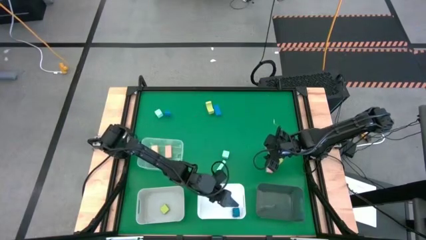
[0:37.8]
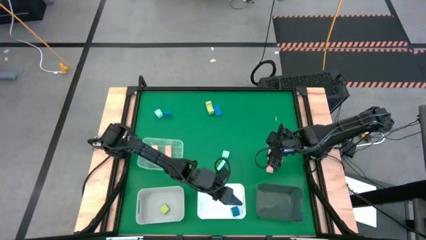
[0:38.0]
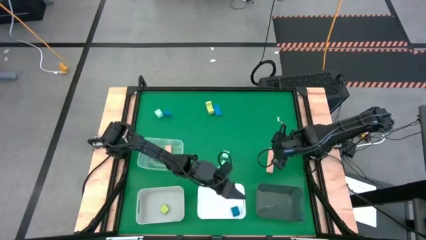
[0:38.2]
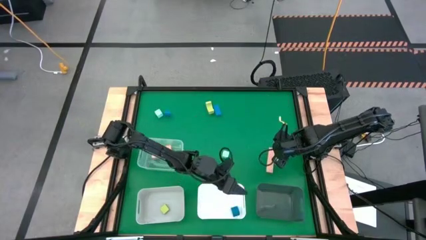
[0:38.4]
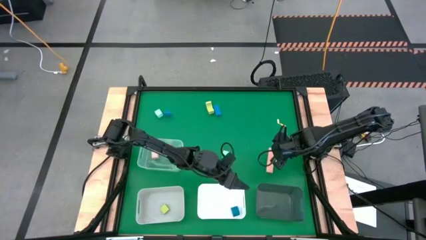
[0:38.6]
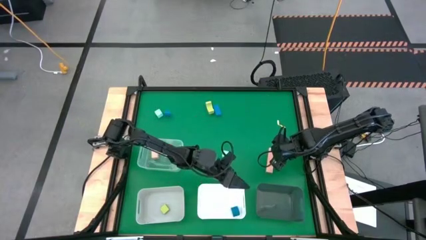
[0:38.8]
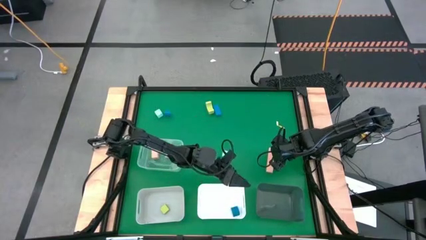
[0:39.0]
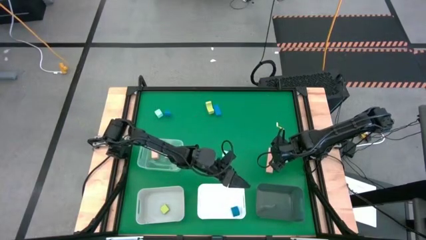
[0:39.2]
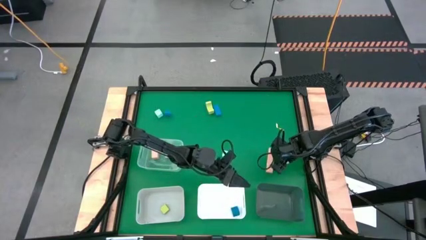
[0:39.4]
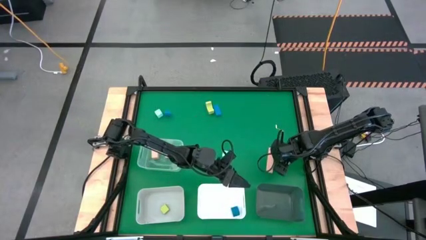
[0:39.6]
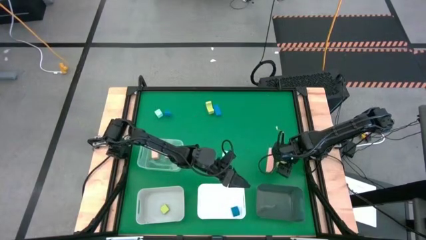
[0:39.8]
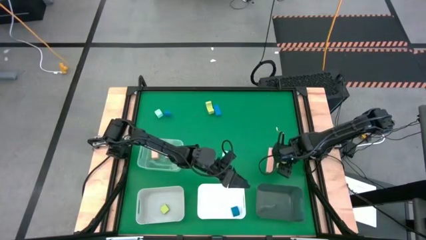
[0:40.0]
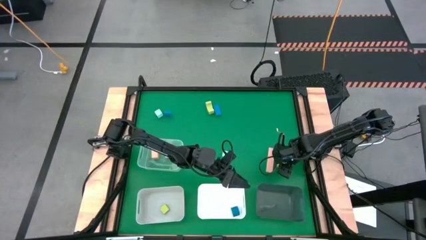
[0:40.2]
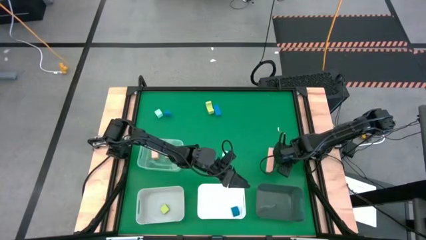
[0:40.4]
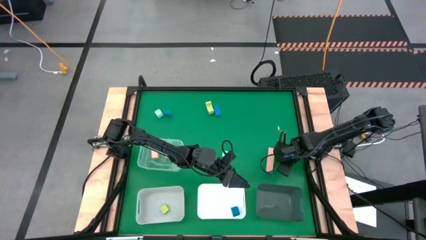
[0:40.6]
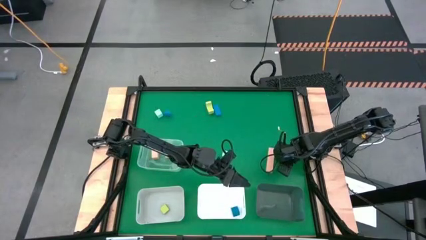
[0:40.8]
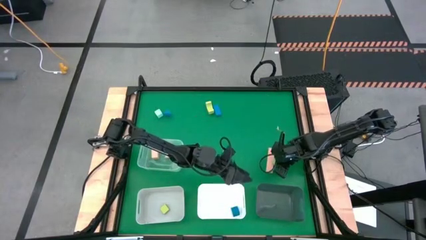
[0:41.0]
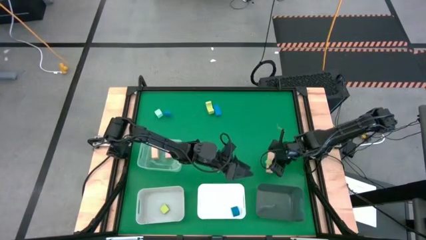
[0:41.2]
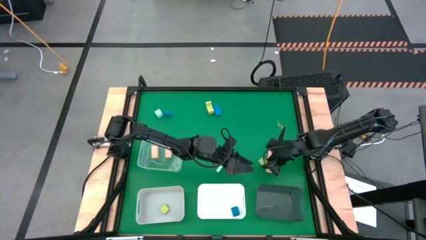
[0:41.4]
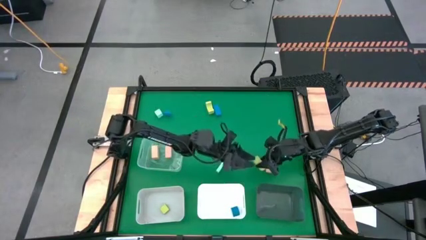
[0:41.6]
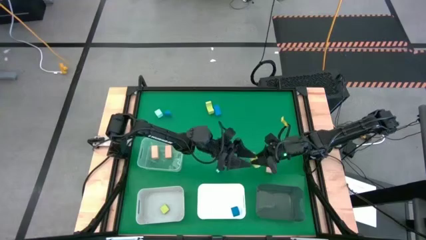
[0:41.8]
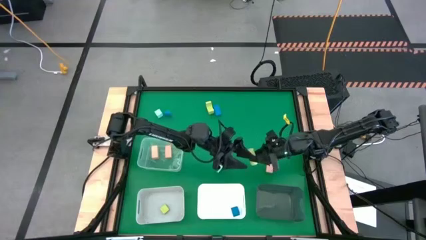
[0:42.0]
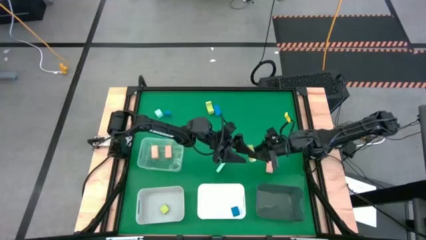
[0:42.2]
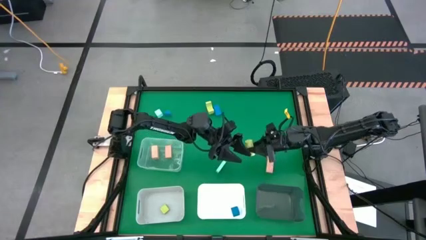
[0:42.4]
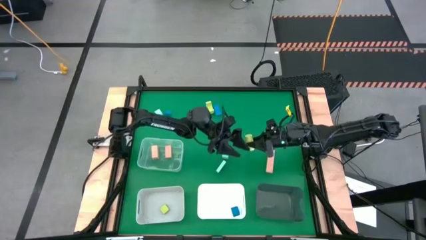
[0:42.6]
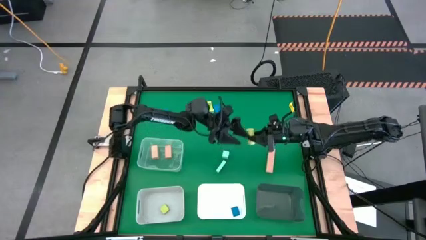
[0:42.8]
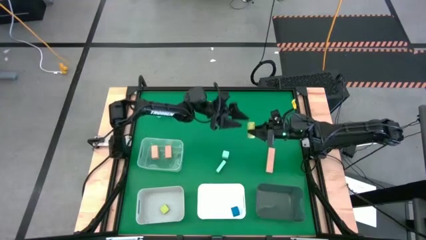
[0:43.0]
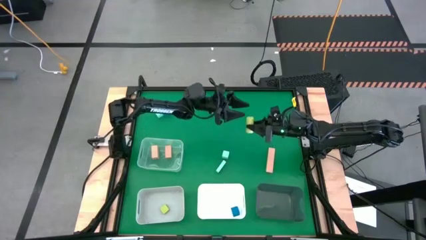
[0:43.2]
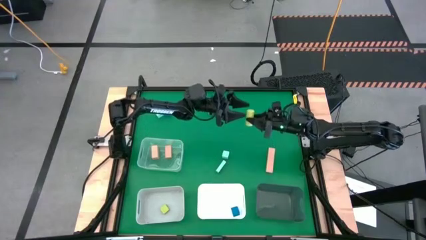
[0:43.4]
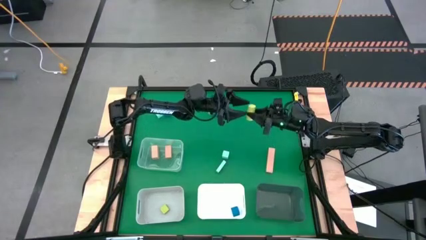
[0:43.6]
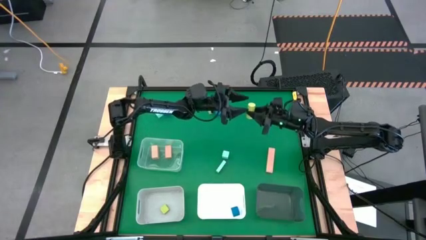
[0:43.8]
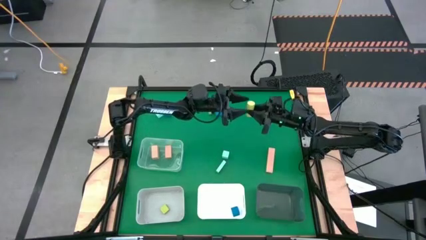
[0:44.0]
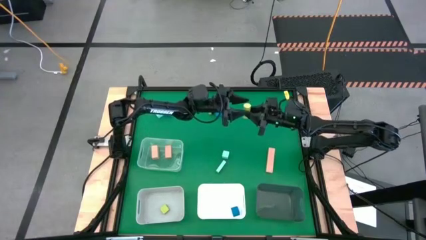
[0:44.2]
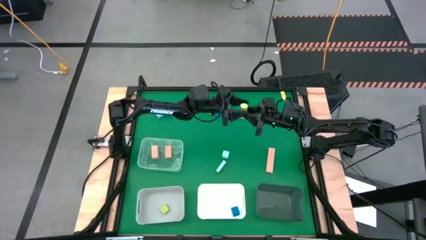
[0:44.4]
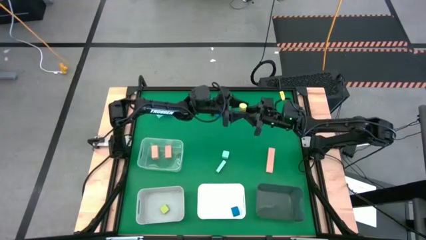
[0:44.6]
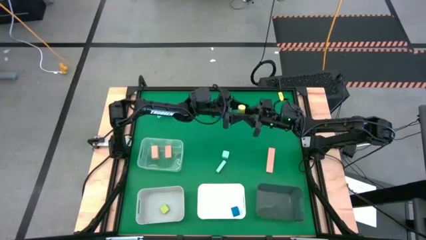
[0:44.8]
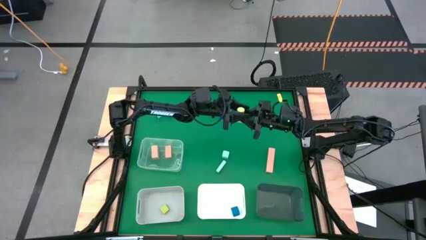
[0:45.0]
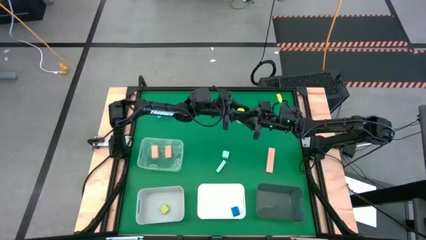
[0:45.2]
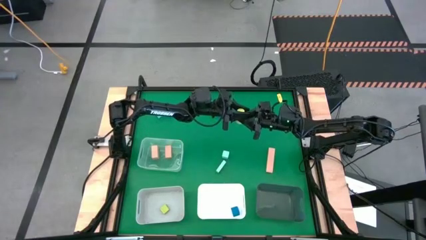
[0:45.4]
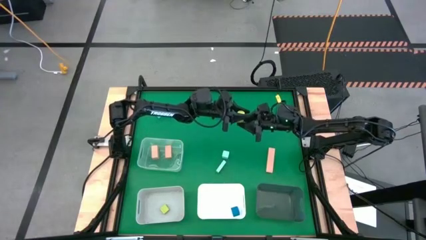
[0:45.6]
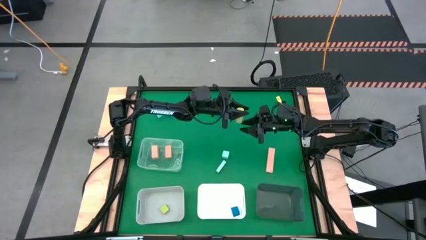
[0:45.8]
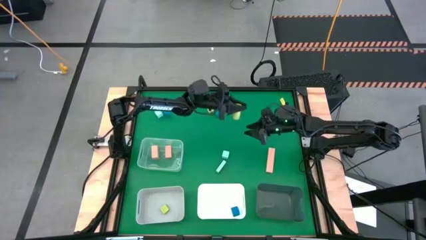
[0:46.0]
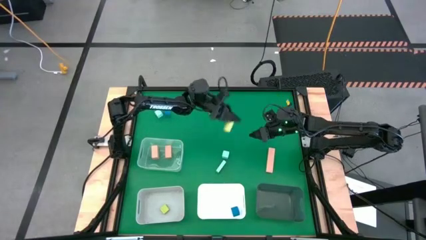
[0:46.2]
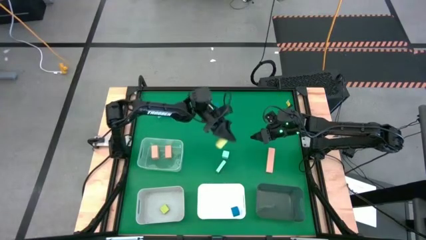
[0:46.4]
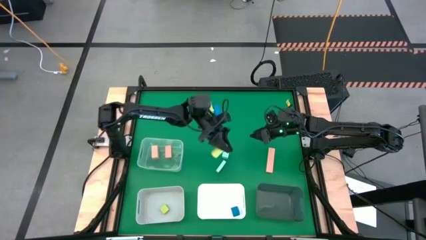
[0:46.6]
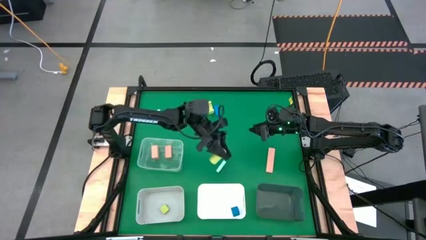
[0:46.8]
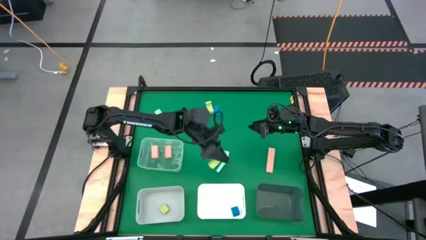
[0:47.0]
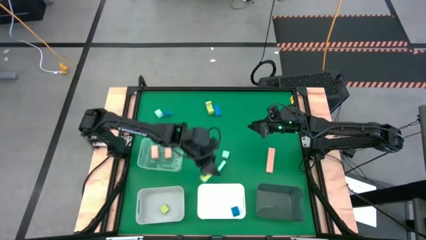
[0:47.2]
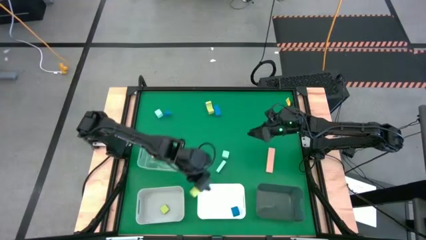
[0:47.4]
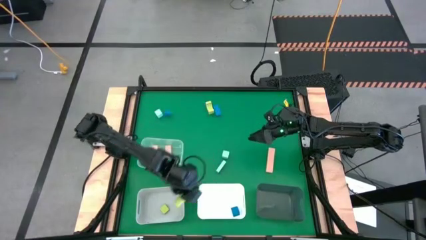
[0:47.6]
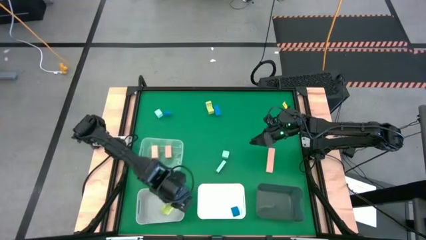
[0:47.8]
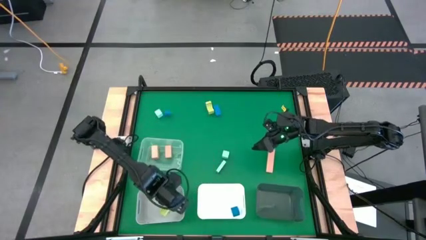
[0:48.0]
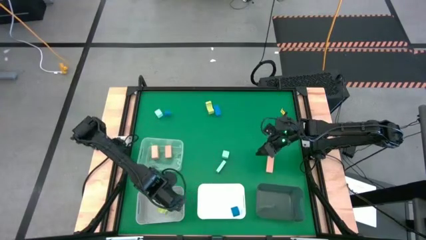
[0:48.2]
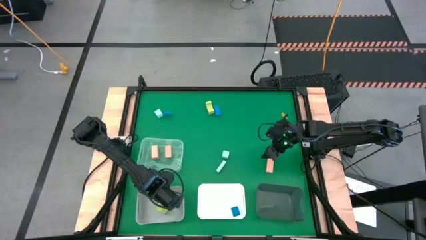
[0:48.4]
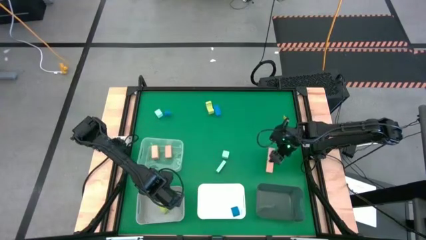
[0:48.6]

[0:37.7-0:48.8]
Task: Sort & place blocks by color
Put the bottom green block into the gray bin

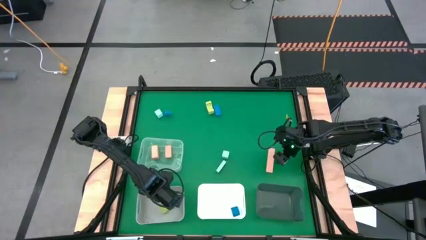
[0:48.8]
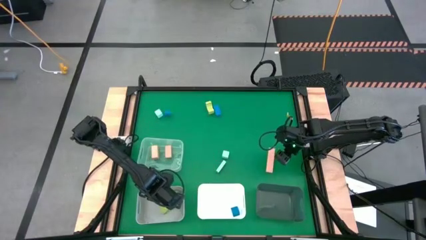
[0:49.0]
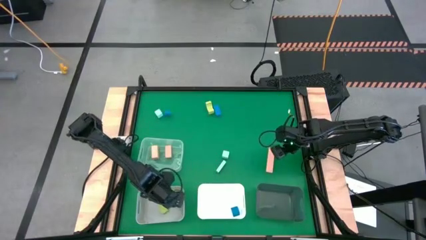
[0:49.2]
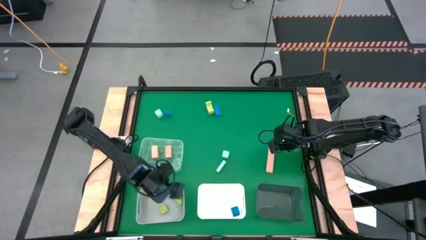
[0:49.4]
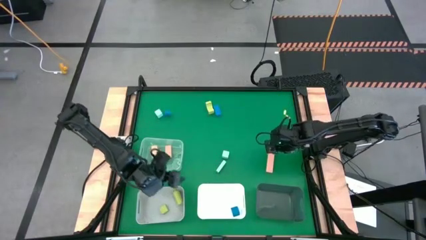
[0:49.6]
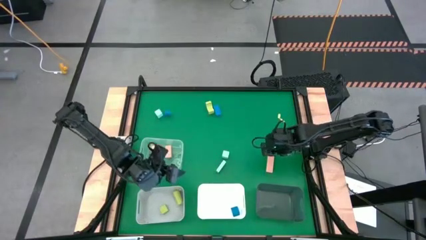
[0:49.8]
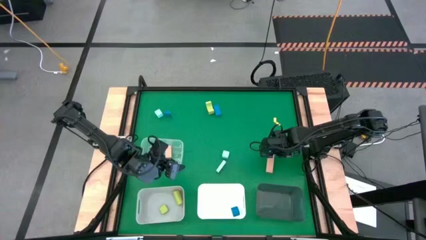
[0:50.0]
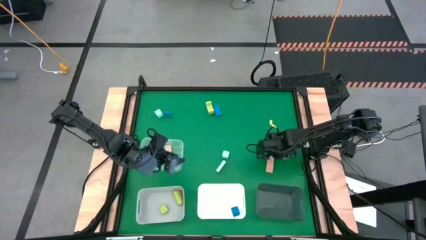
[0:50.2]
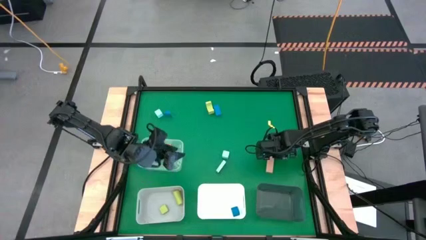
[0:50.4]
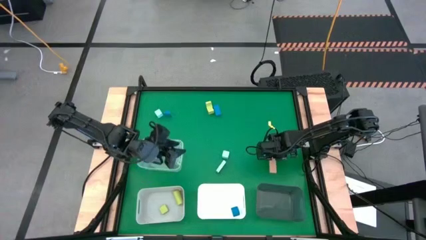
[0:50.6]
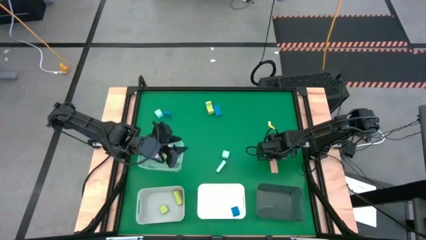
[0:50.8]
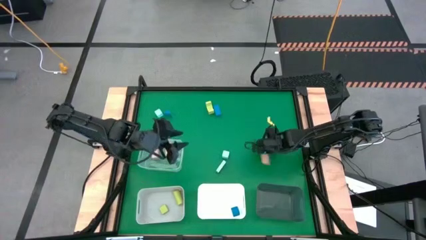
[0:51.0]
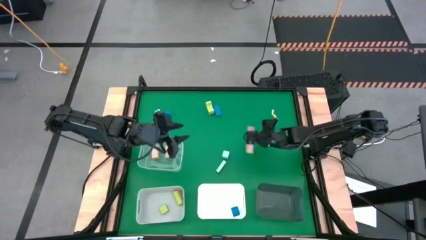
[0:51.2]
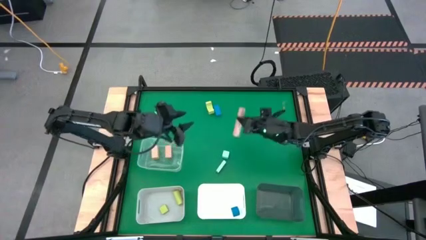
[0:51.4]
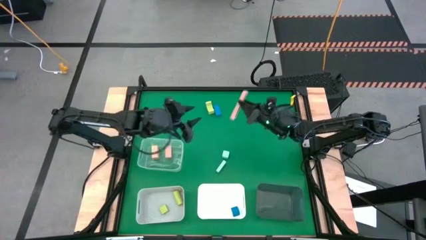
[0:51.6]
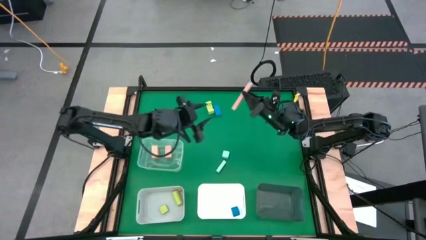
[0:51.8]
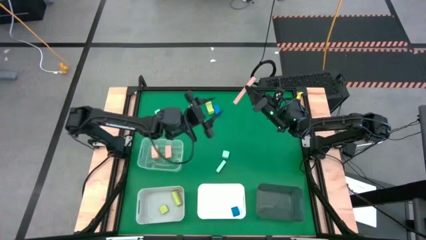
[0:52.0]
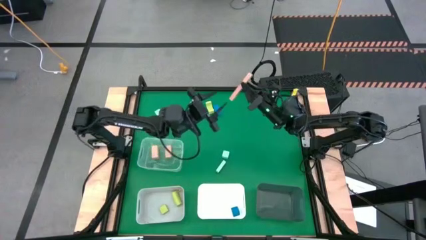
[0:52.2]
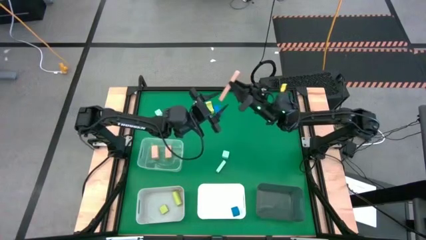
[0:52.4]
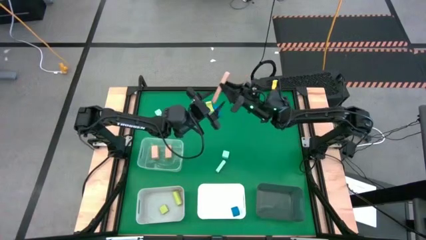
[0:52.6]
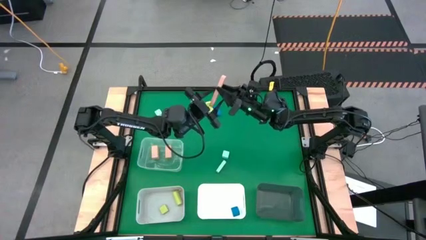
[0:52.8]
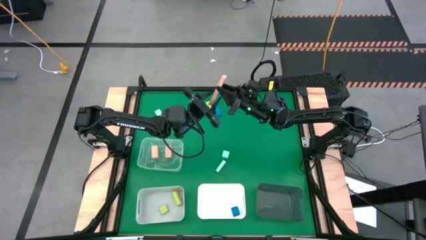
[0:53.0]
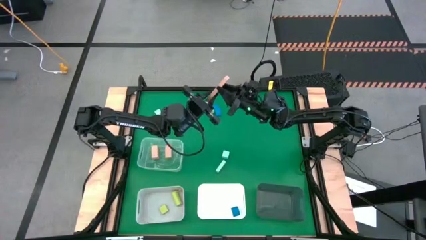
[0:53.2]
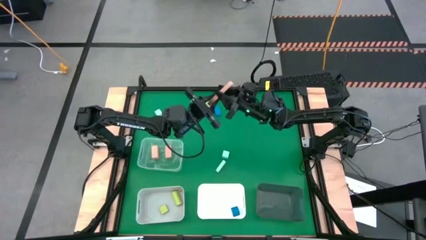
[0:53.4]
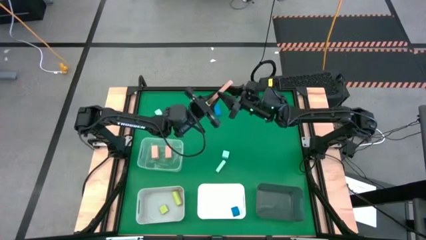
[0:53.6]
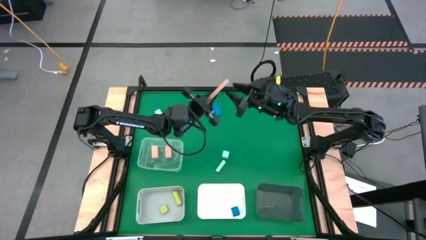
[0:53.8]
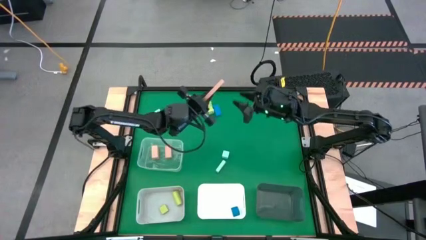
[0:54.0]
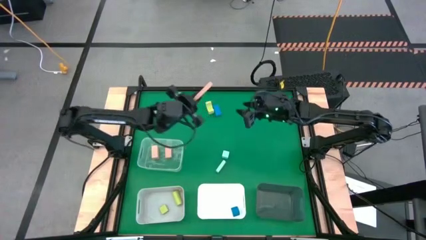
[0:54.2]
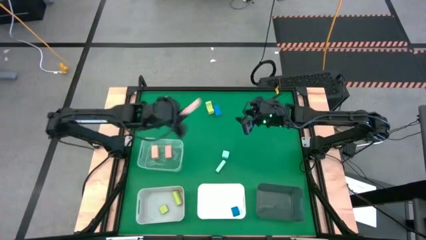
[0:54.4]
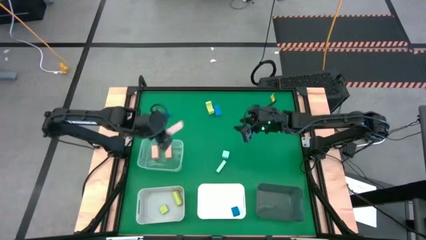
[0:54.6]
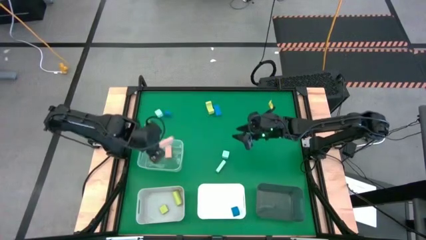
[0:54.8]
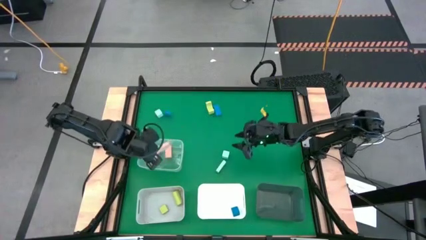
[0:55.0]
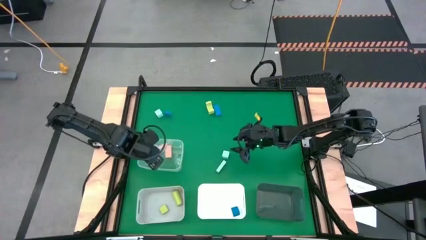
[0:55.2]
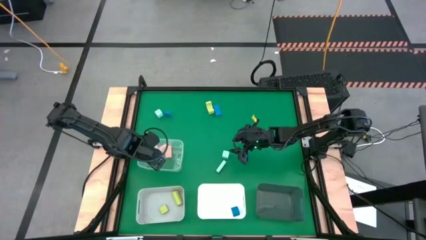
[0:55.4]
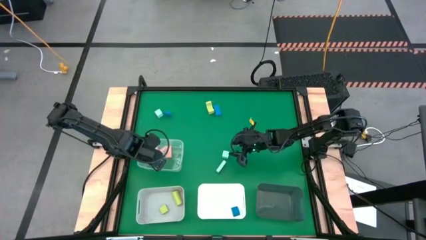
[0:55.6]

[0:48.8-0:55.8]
Put the light brown block into the transparent bin
